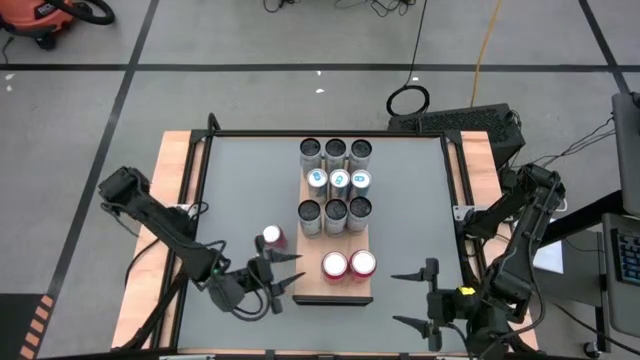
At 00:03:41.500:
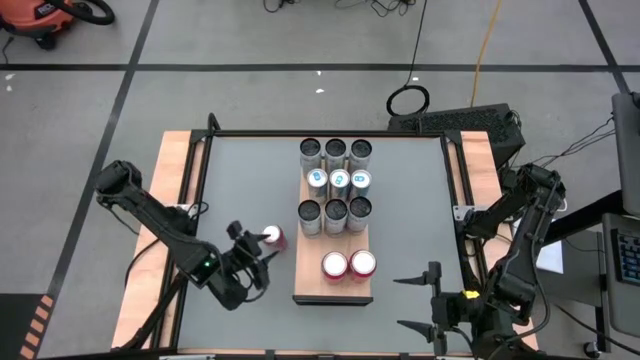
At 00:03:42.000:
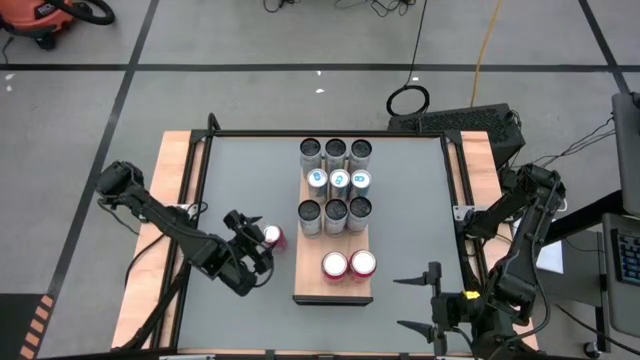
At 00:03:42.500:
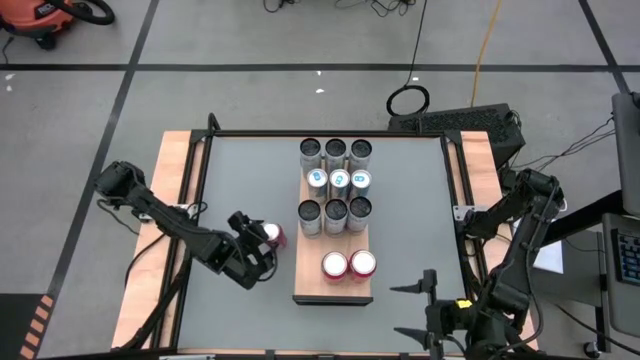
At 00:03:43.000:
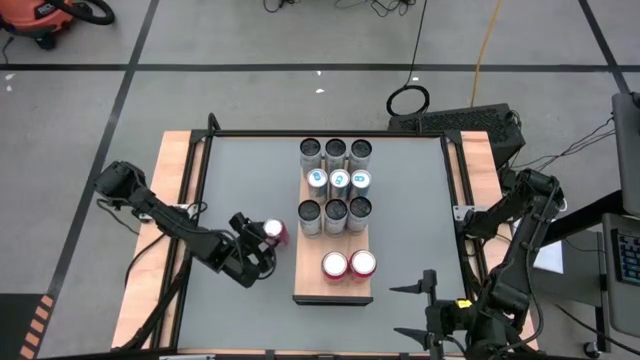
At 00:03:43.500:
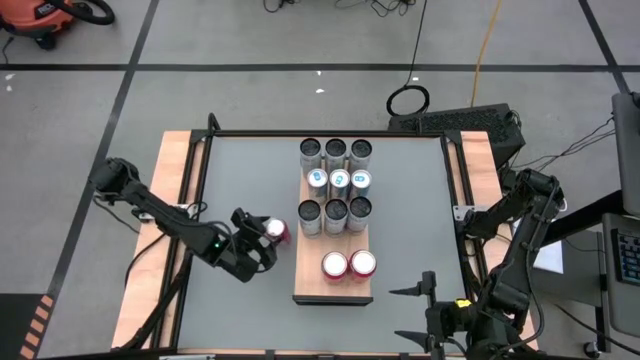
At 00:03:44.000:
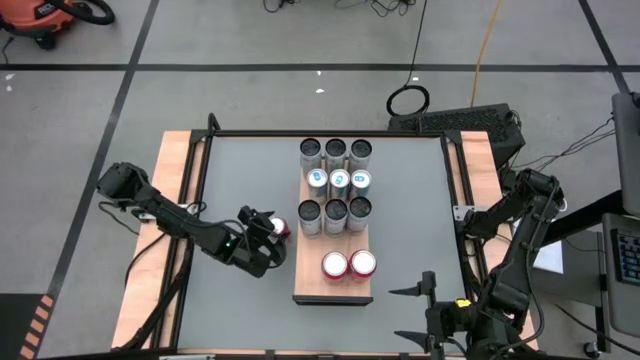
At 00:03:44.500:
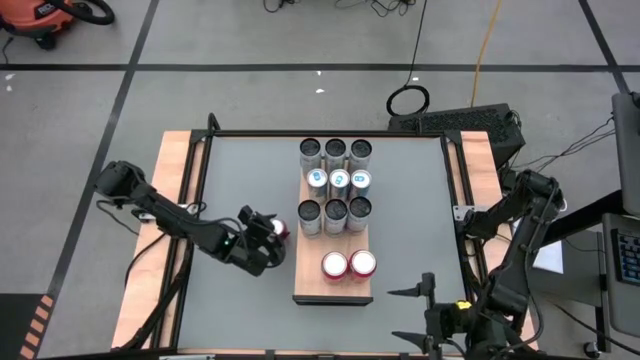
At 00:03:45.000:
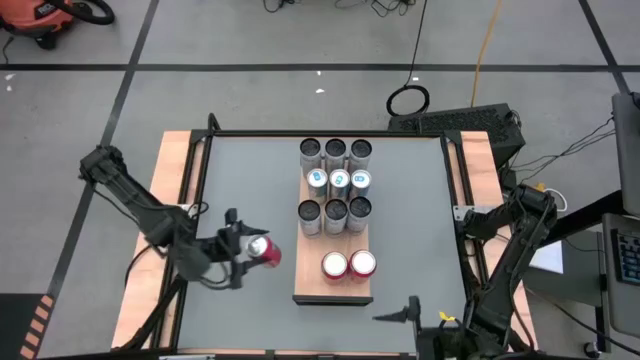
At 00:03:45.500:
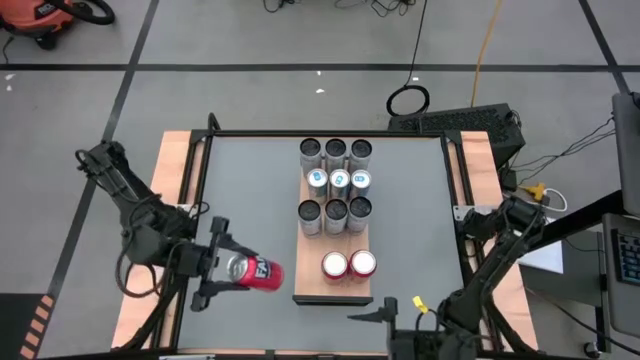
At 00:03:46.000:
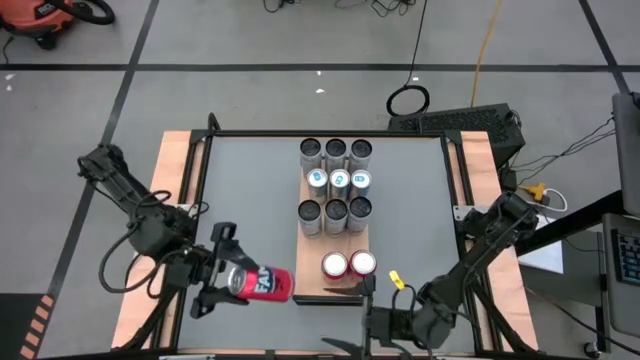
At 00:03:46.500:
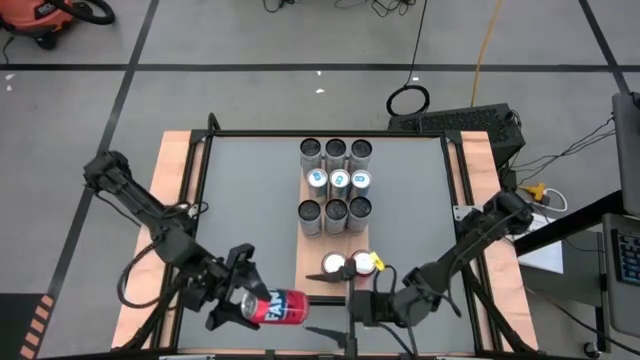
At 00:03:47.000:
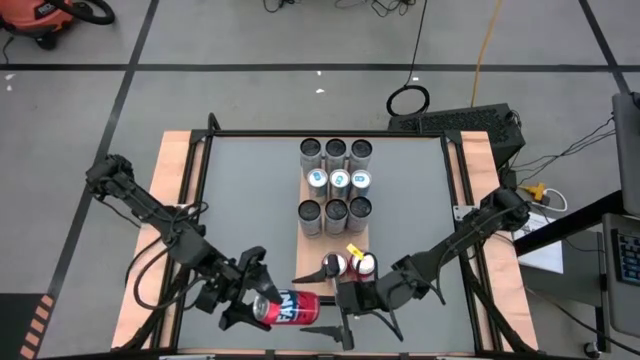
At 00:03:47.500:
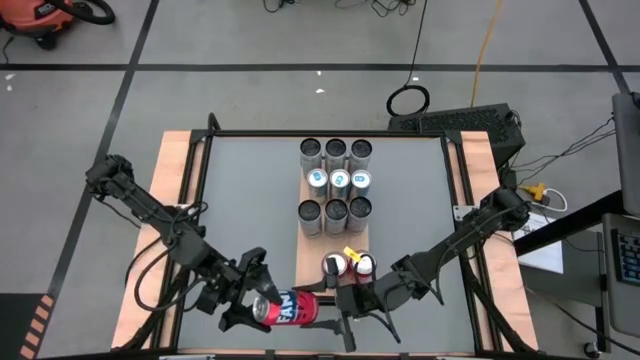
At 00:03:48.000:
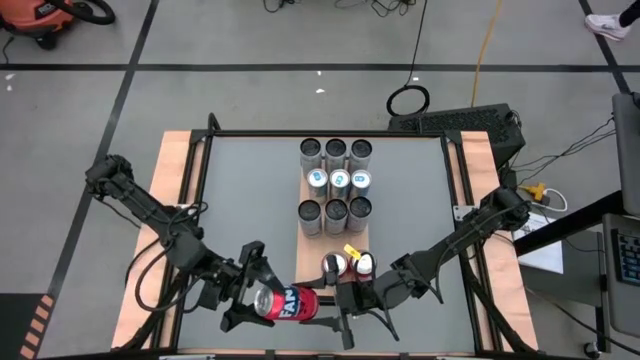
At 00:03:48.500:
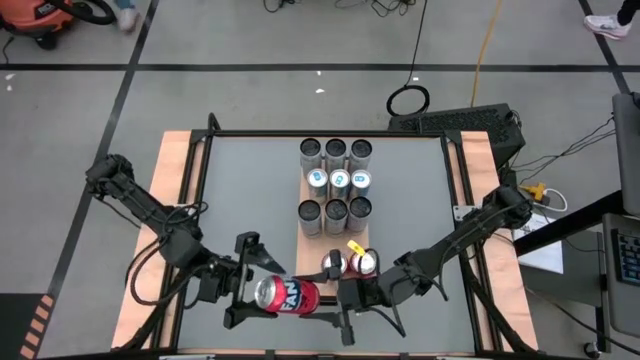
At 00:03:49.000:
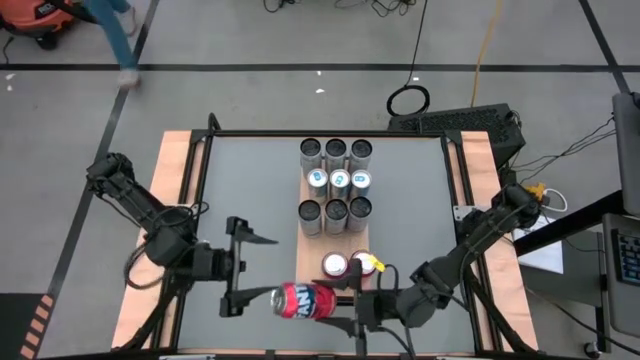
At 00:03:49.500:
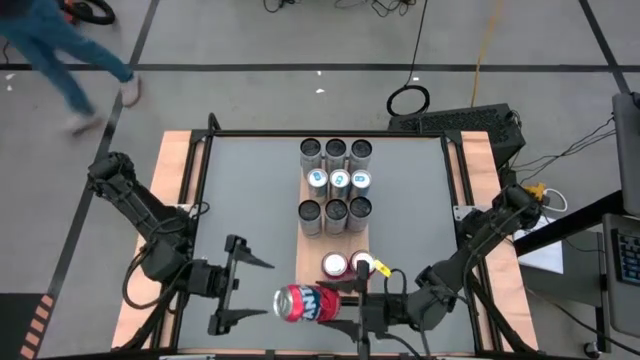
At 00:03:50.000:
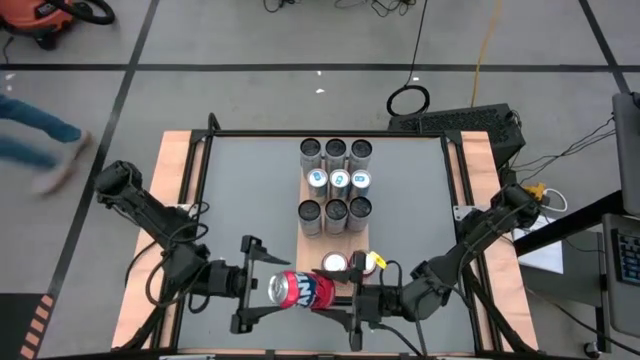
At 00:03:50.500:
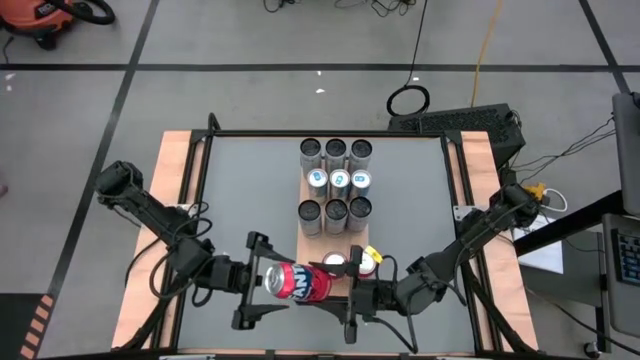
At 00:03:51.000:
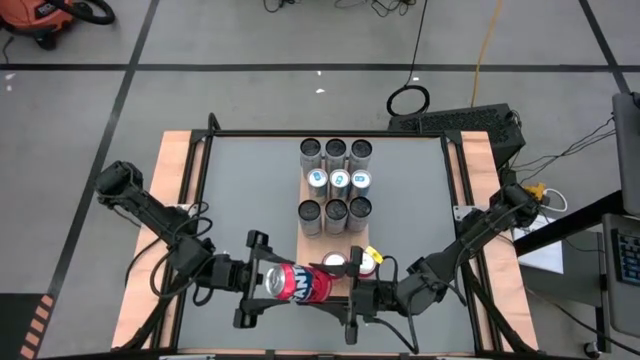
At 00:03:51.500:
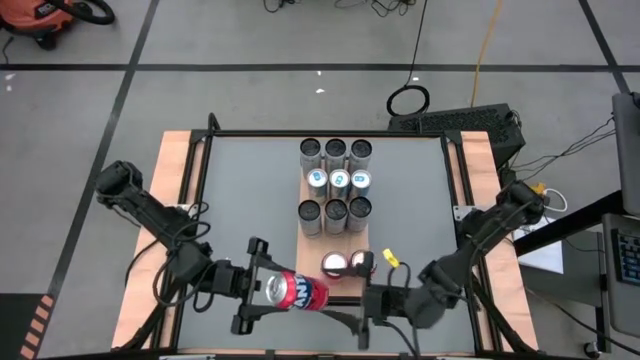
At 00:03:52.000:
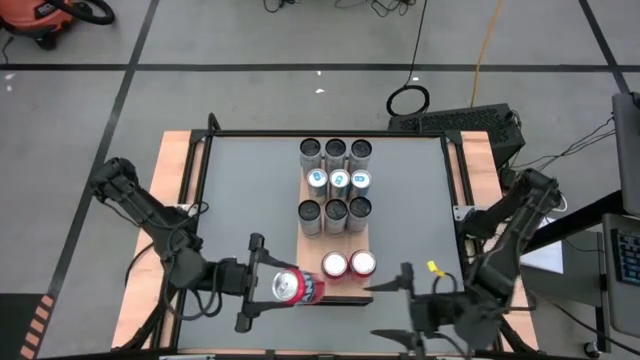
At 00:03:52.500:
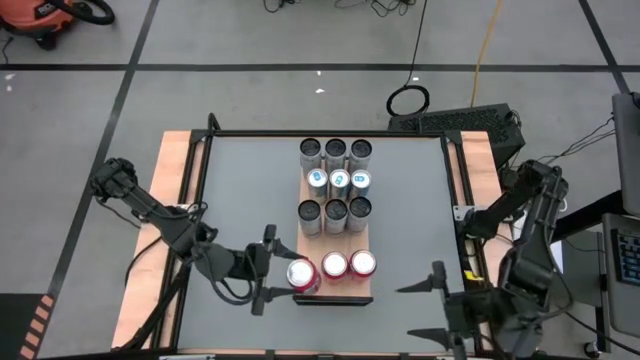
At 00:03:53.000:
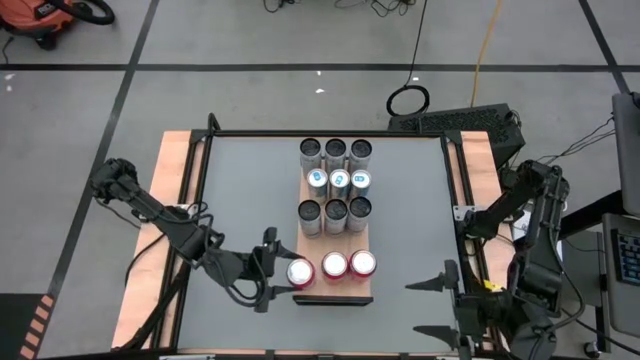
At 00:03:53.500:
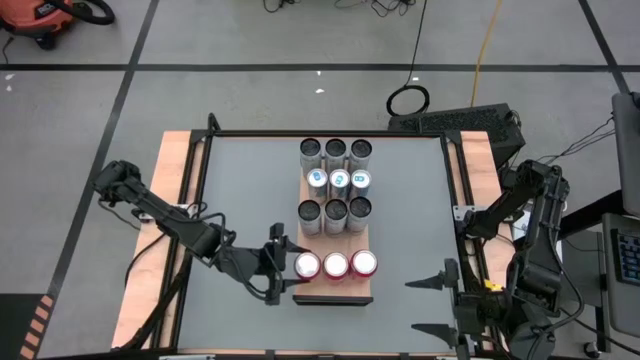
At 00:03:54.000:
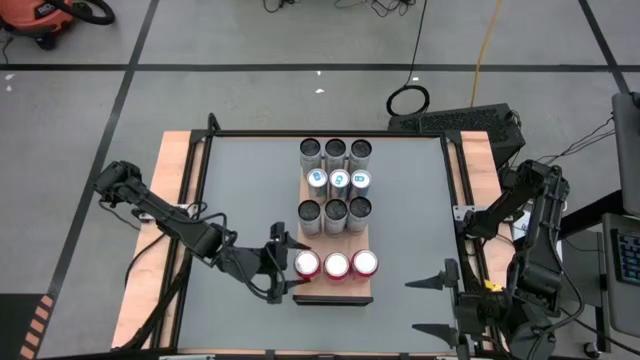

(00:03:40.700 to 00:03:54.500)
Task: Place canned beverage on shelf
Put the red soda can on the shelf aligned with the other red soda cans

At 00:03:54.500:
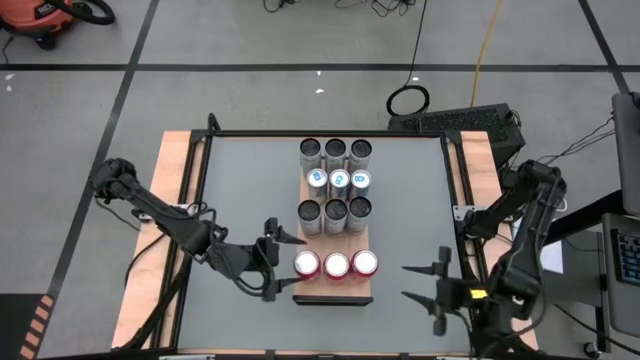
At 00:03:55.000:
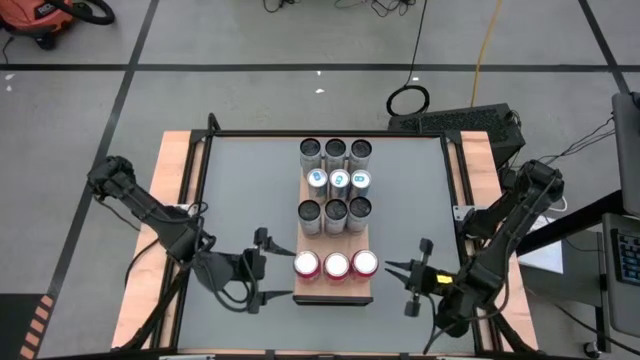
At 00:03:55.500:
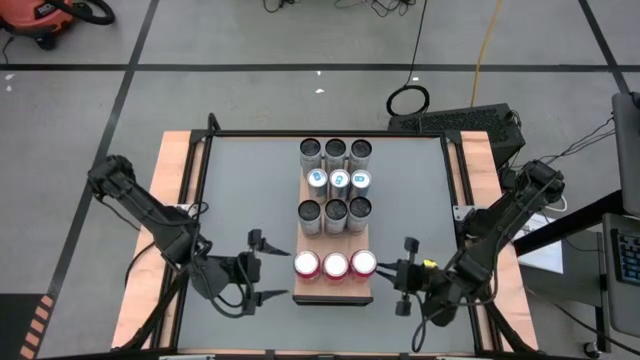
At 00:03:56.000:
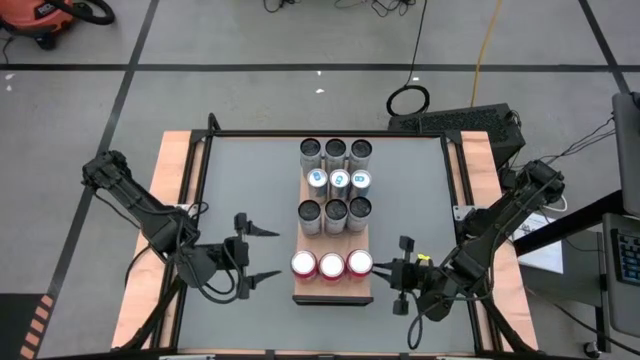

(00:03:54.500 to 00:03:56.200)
Adjust the red soda cans on the shelf

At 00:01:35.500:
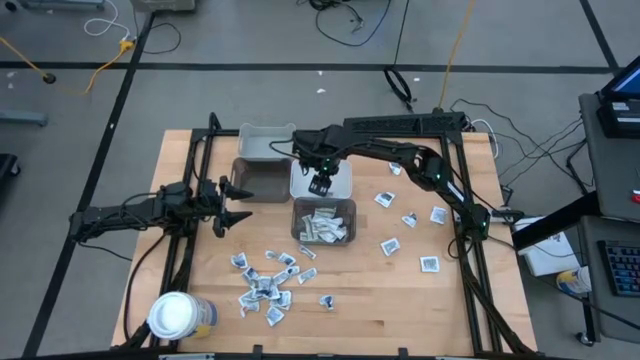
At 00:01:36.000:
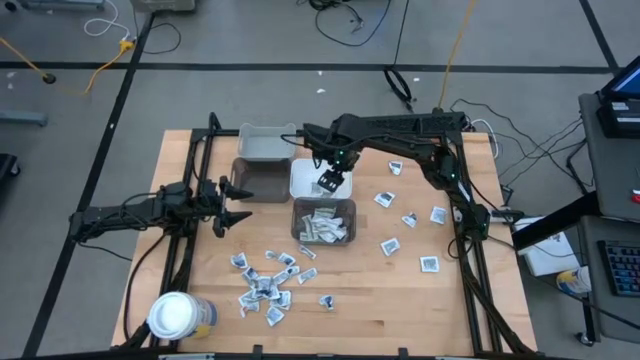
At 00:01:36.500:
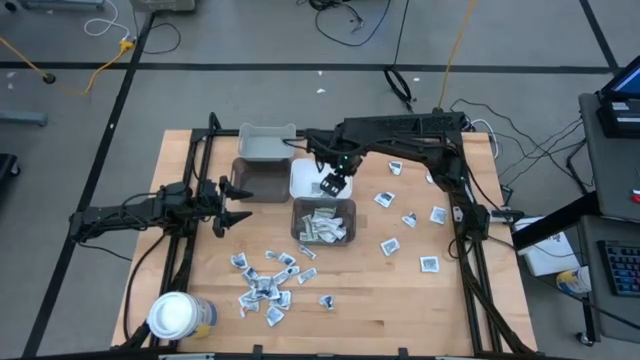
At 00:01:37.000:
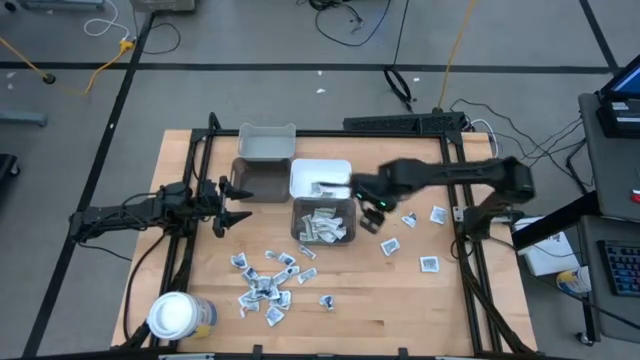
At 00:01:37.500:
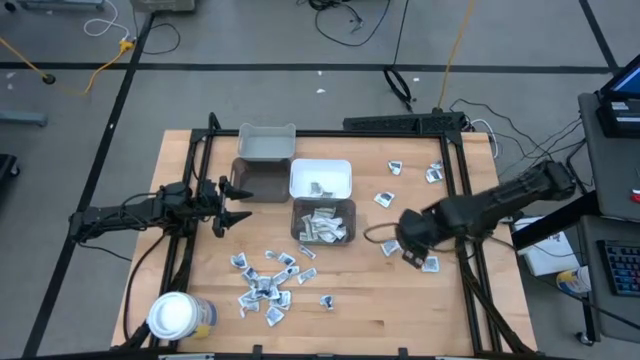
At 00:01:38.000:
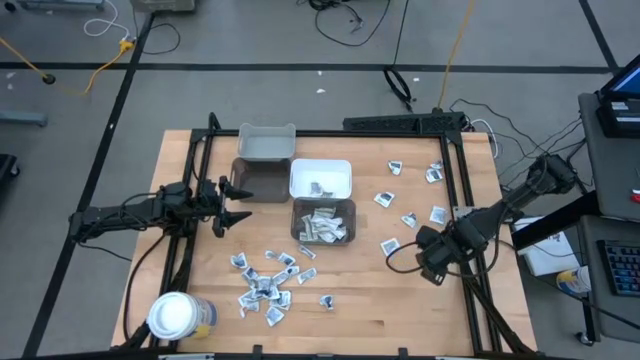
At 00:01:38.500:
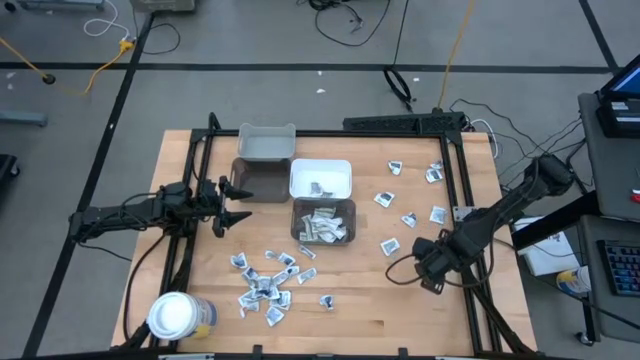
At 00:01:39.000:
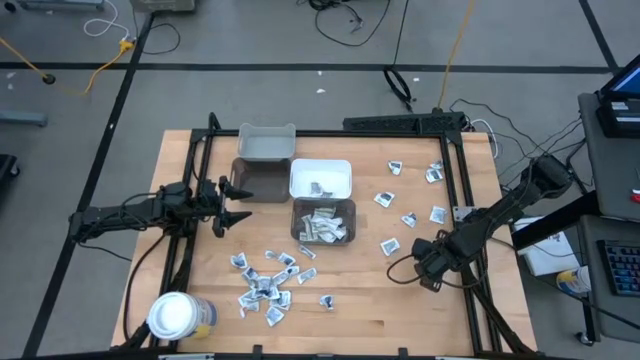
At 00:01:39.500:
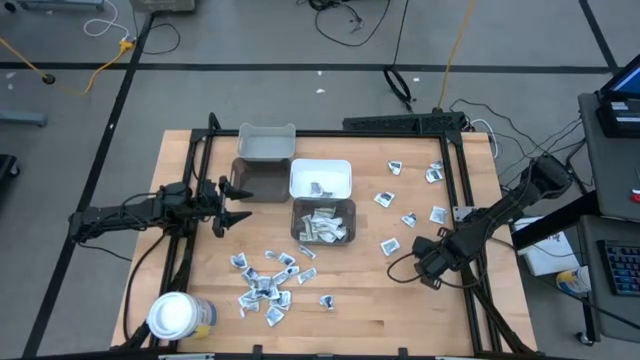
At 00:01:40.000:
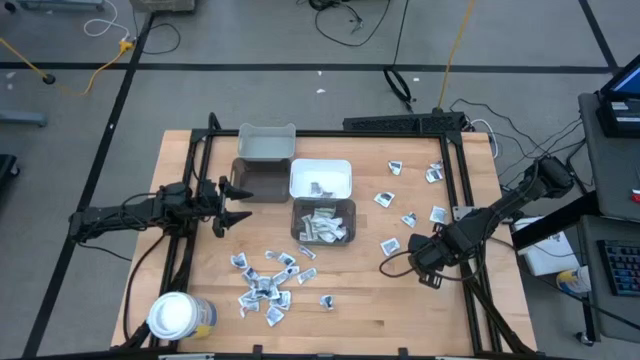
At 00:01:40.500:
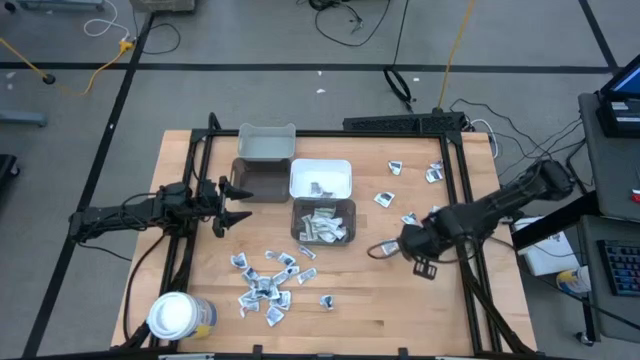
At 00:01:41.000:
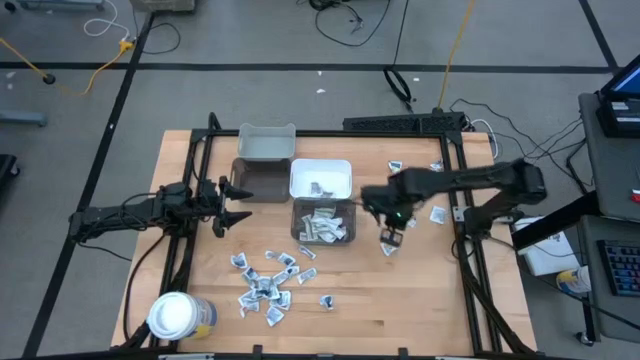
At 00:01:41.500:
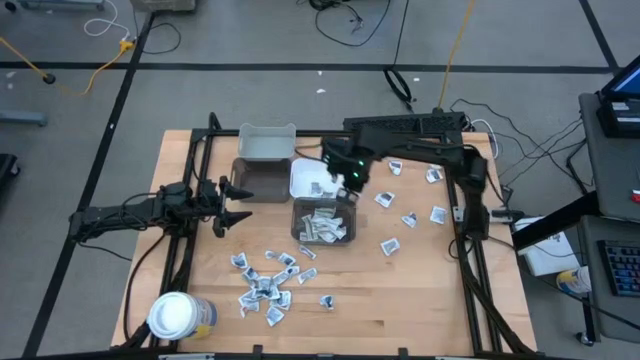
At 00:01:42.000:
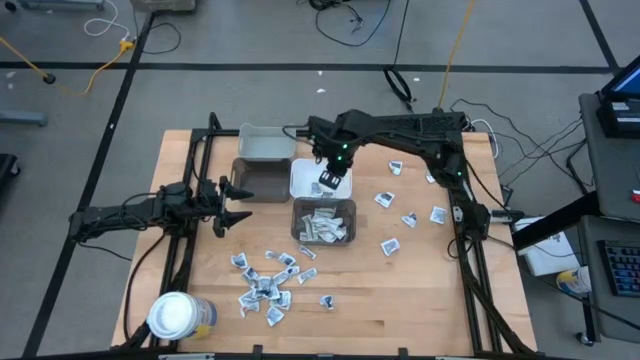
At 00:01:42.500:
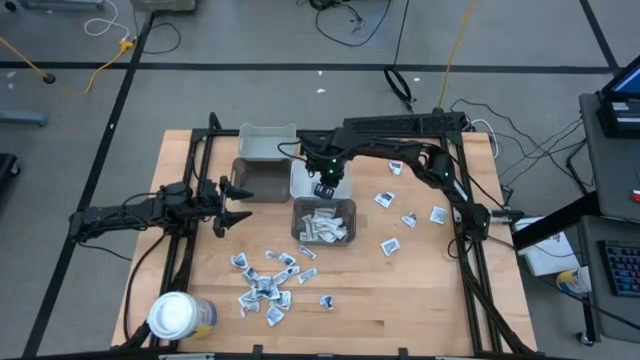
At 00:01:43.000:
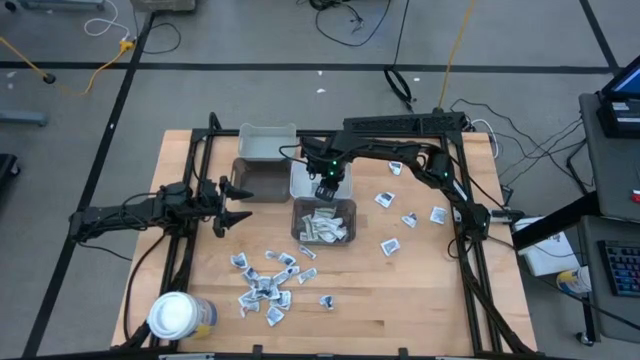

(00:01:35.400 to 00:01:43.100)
Task: Pick & Place First Aid Supplies
Put the gray towelette pack into the white bin
